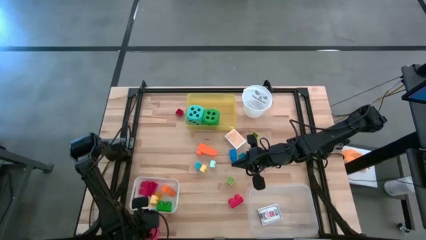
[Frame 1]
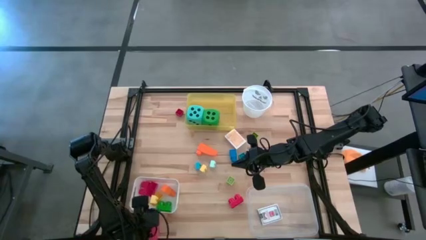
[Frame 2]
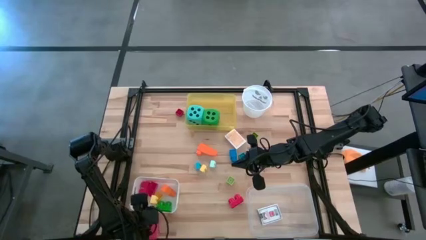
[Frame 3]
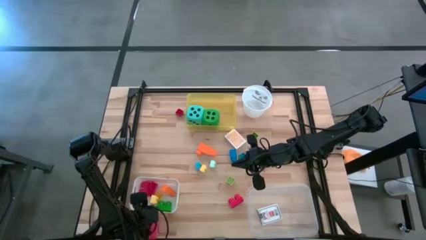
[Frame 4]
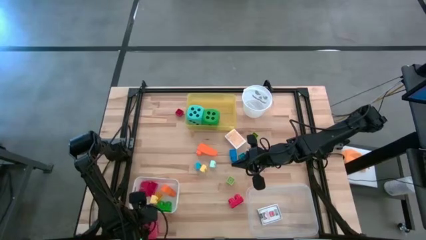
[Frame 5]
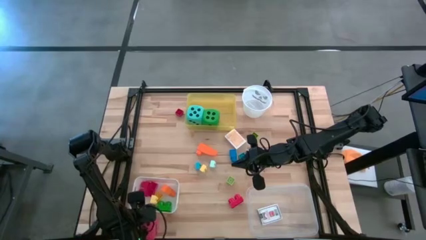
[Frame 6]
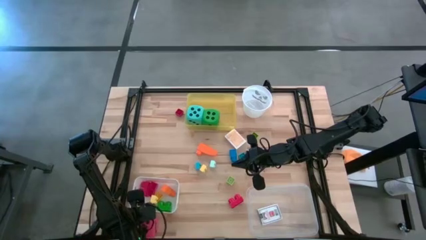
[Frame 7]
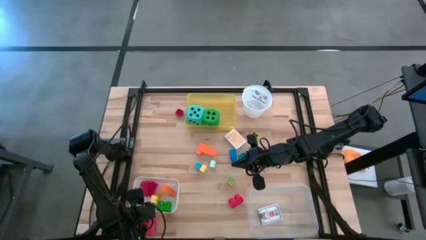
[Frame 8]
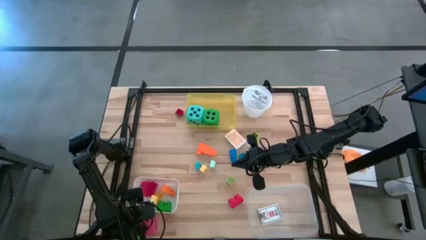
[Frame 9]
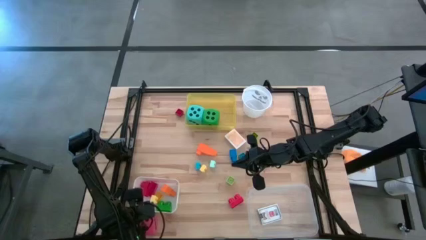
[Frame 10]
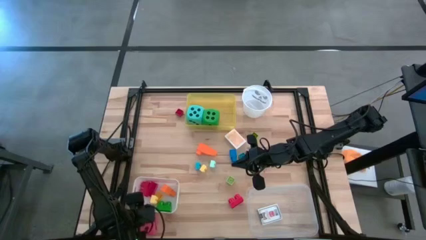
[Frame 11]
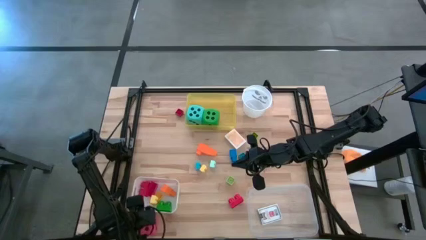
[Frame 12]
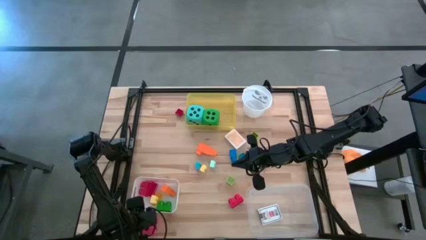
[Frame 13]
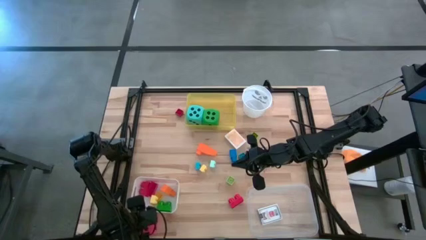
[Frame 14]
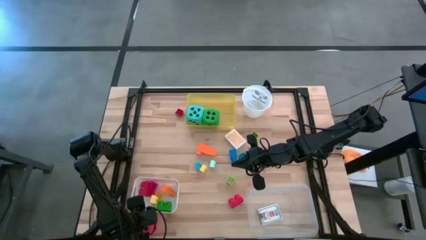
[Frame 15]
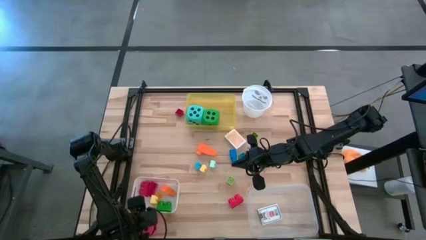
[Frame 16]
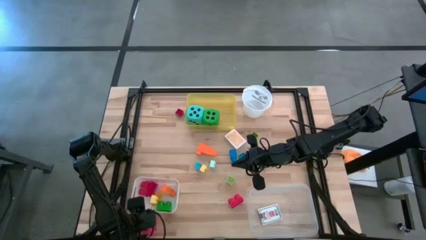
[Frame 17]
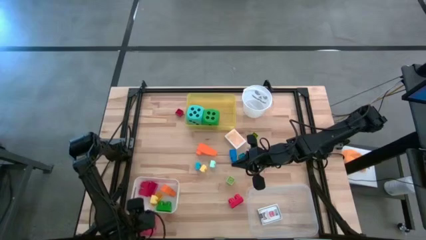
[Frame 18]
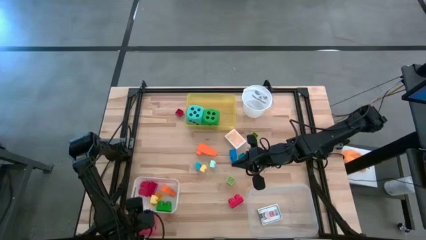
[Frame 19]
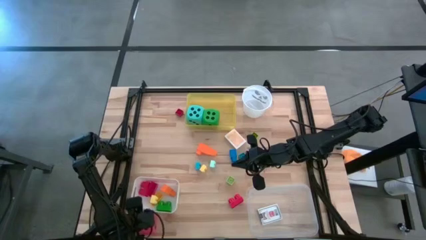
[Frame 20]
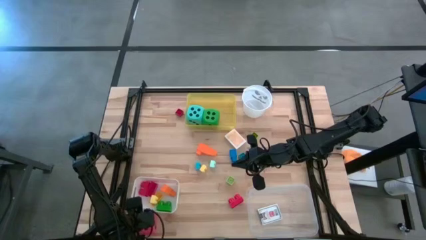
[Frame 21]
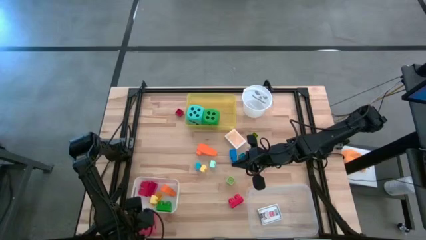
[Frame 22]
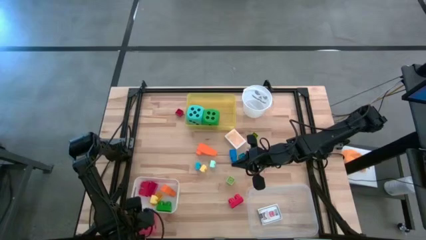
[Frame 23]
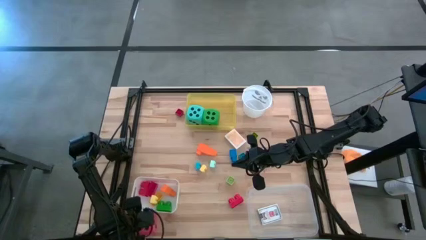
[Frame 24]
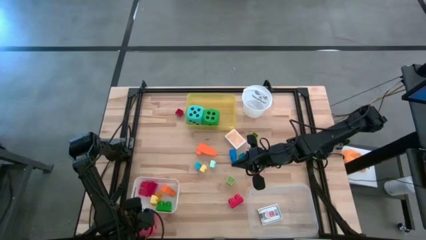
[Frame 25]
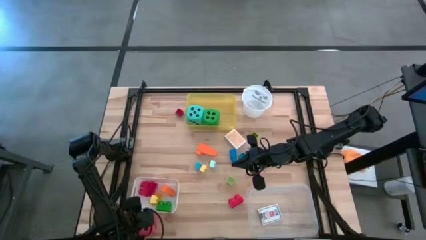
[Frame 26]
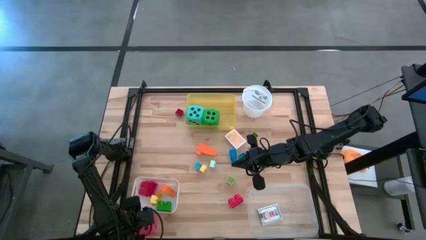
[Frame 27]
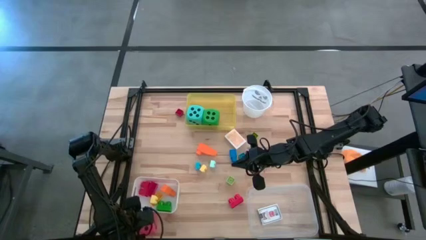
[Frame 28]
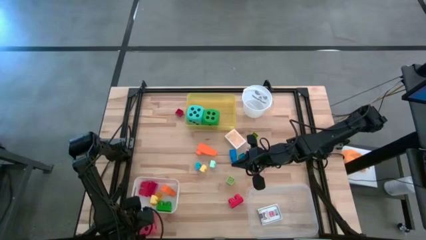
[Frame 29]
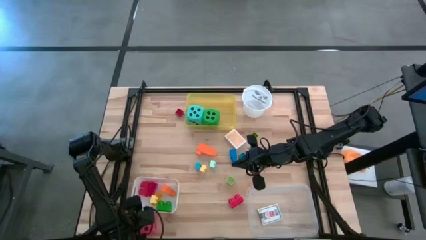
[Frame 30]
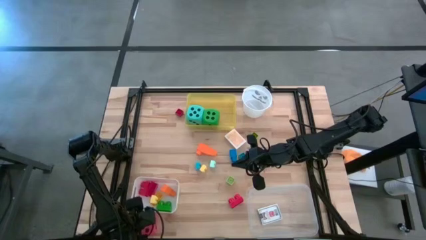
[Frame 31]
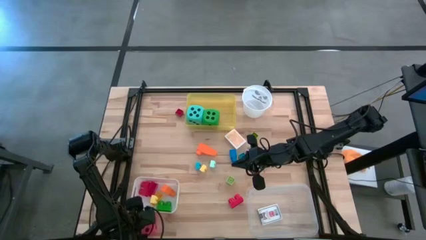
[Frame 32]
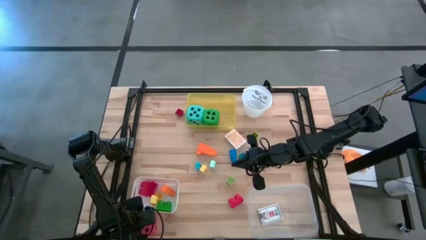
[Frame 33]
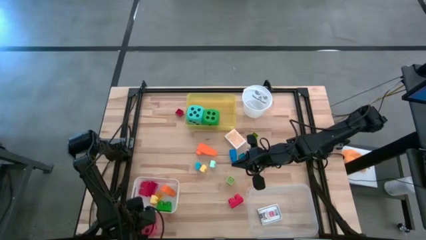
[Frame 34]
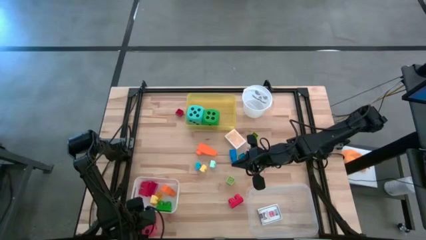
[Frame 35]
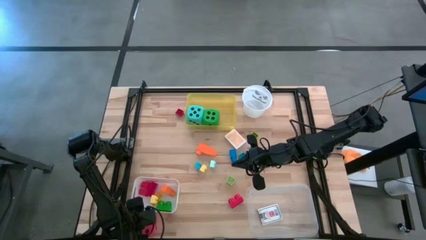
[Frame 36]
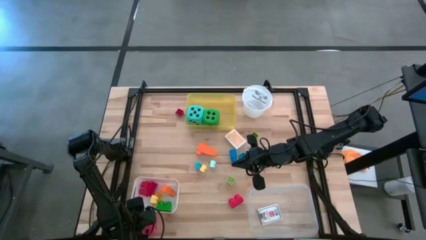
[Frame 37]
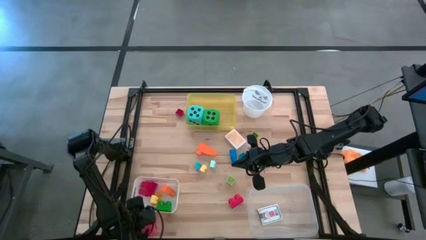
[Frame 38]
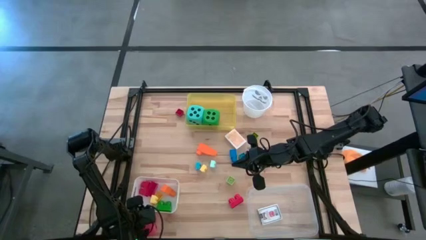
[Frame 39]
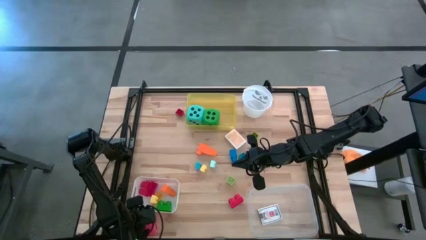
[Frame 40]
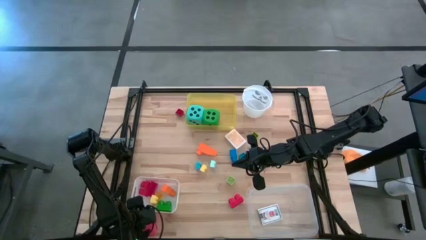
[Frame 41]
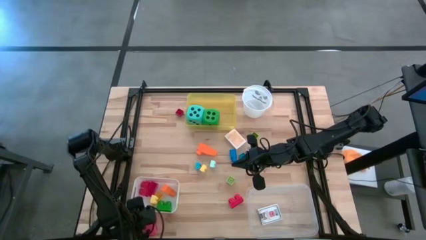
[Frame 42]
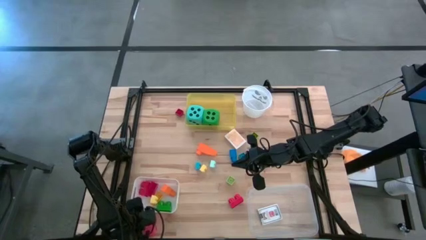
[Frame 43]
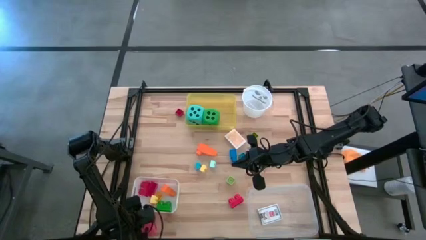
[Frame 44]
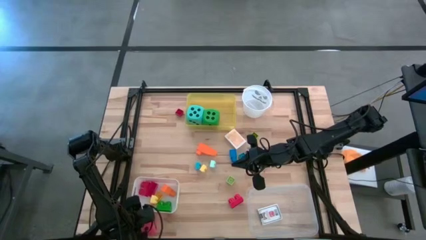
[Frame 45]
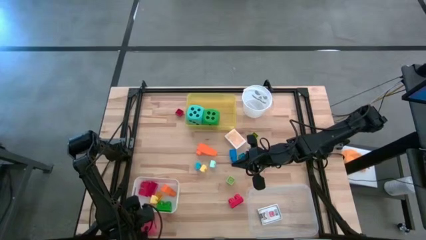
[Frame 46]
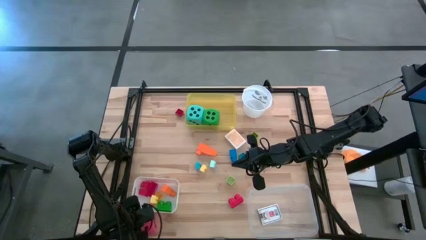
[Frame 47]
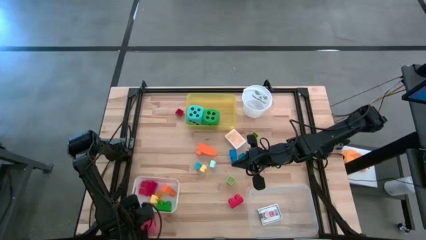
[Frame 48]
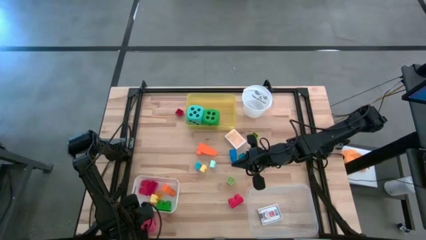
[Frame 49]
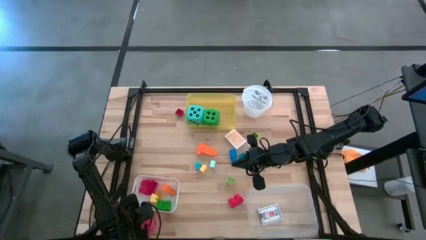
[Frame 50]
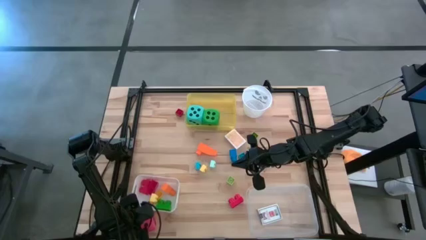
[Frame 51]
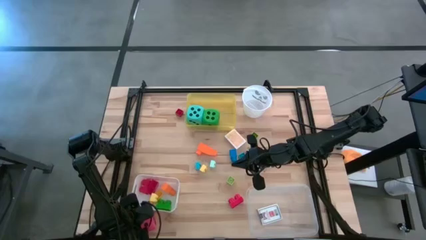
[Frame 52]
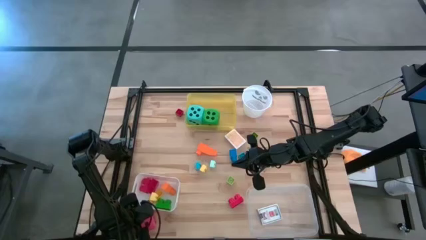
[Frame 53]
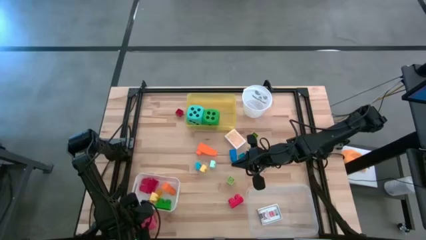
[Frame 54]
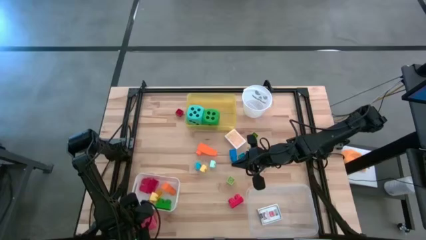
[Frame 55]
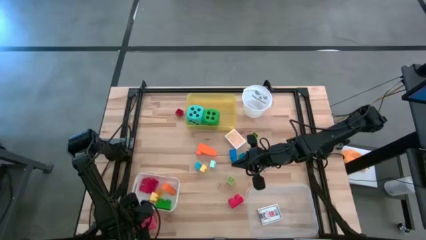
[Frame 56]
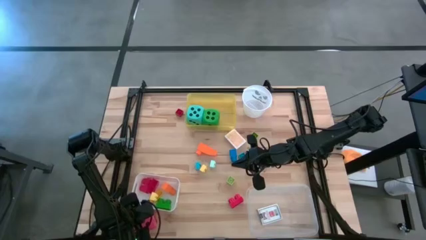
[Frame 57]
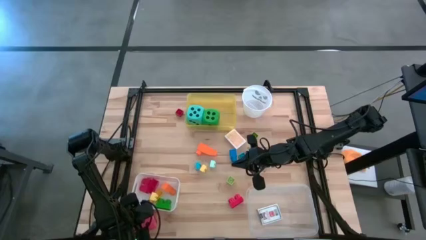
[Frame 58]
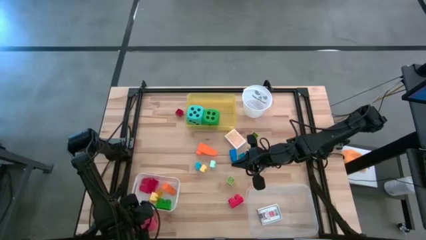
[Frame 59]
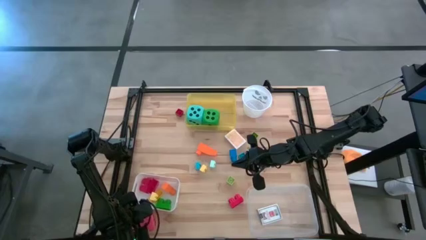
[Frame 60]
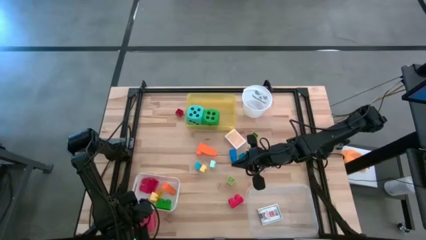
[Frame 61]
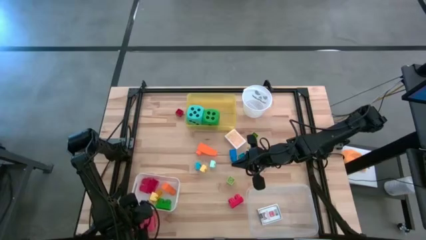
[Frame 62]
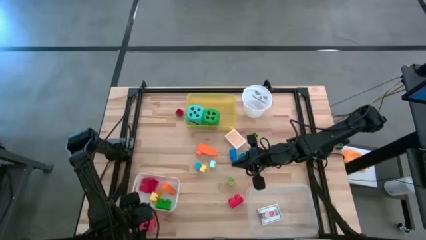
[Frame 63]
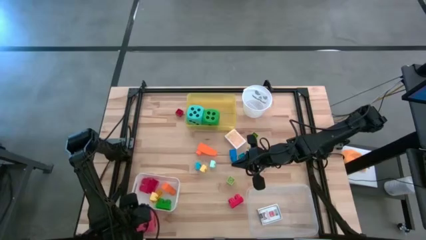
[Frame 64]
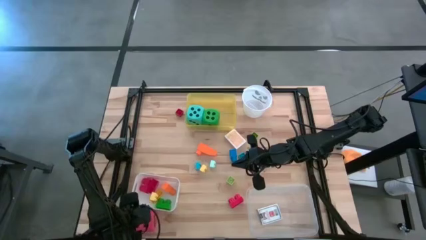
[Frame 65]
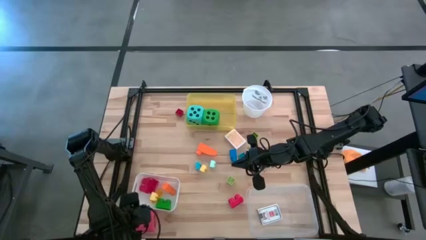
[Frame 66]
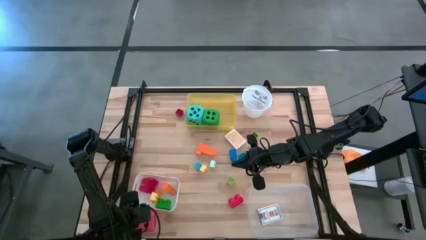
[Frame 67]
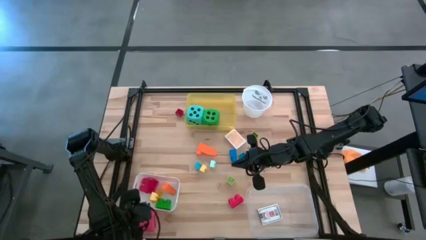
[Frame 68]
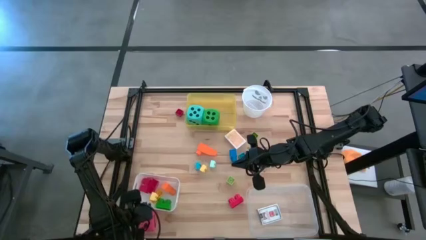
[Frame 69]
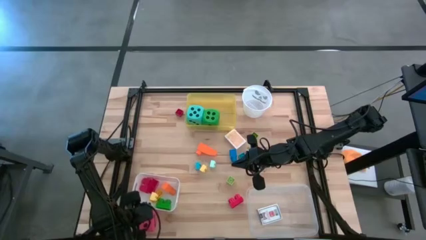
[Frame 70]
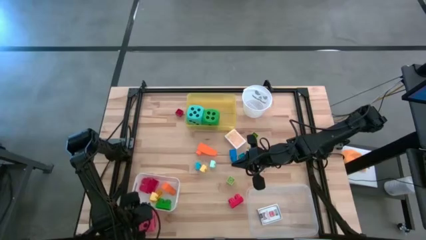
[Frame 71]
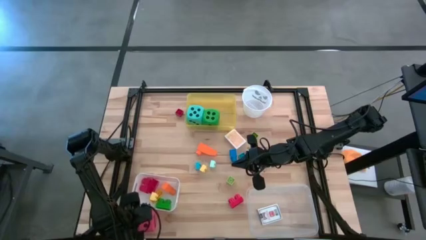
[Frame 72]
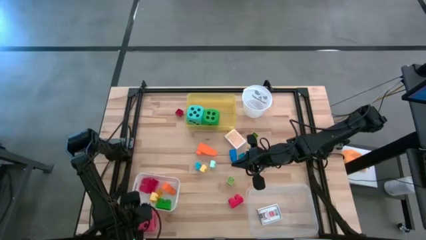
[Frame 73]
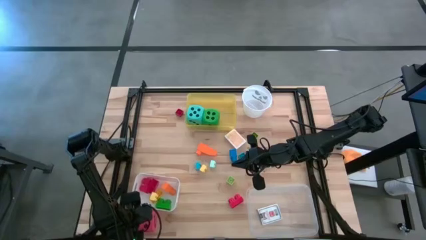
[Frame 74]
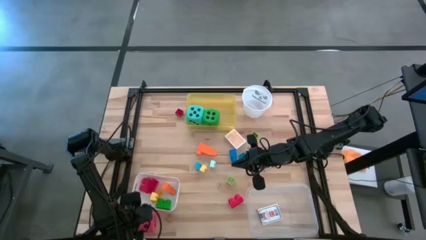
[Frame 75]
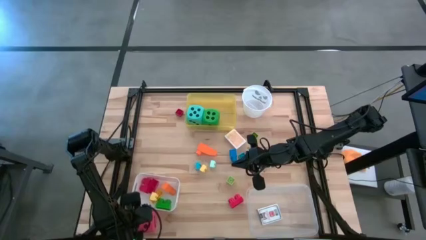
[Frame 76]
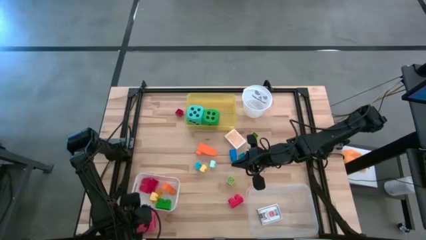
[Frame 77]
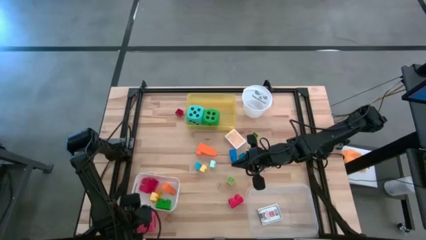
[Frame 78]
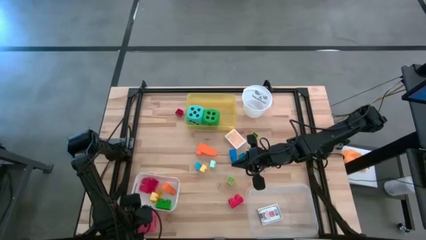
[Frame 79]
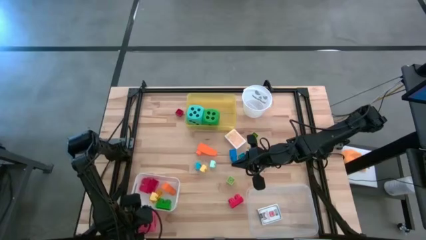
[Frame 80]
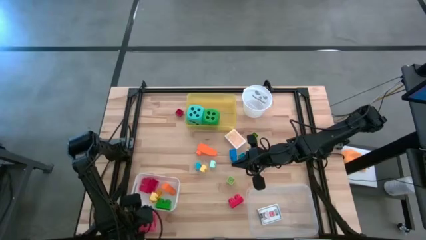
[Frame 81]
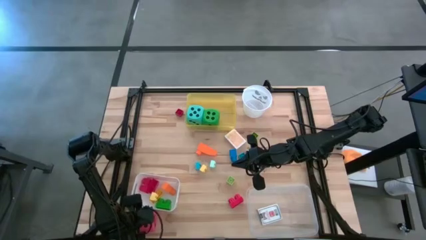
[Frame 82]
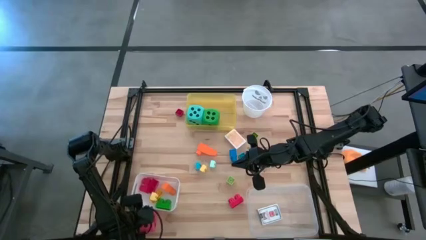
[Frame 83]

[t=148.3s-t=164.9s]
Task: Pick & Place Toys
Put the pink die into the yellow bin
